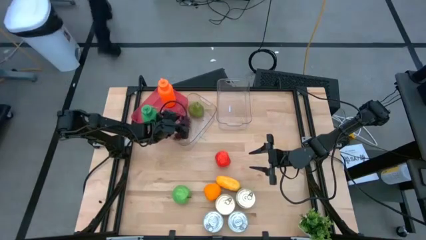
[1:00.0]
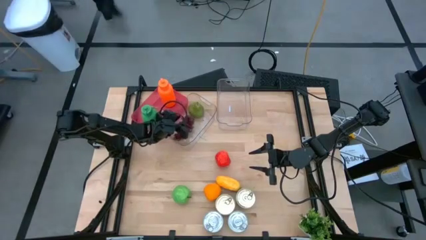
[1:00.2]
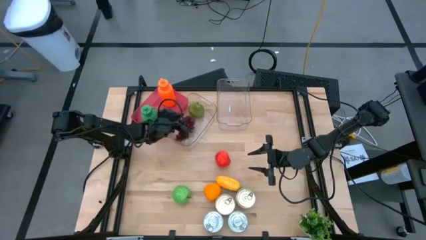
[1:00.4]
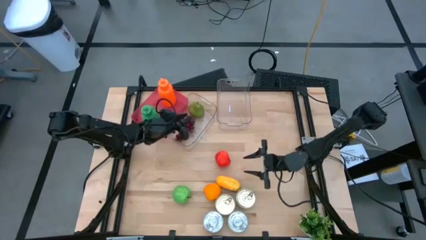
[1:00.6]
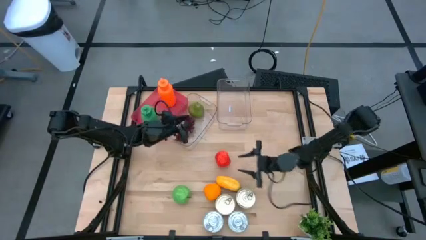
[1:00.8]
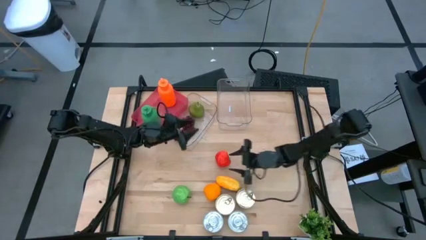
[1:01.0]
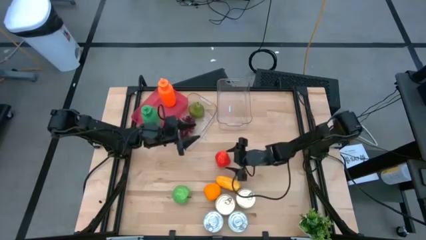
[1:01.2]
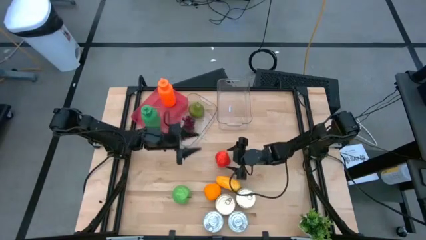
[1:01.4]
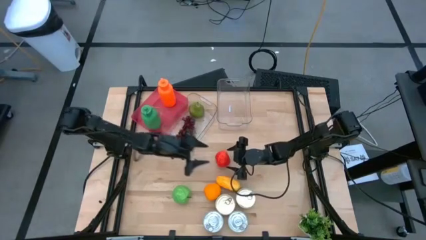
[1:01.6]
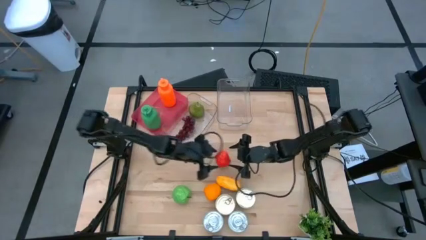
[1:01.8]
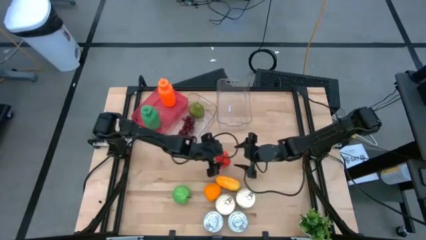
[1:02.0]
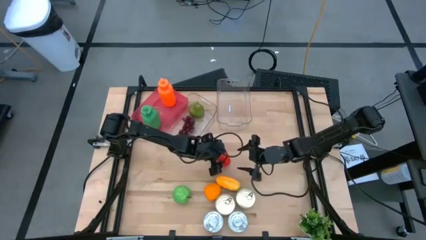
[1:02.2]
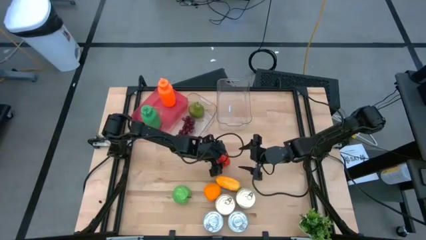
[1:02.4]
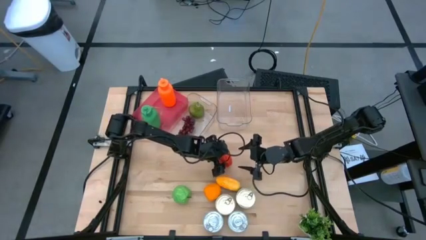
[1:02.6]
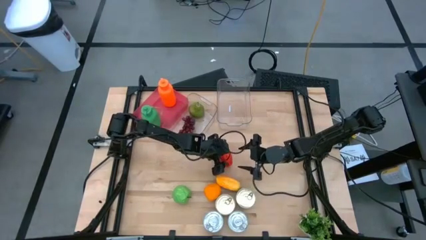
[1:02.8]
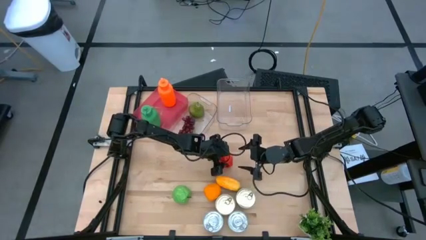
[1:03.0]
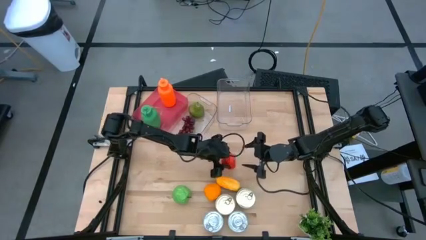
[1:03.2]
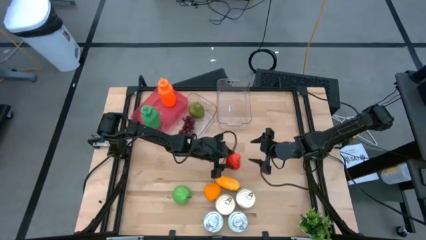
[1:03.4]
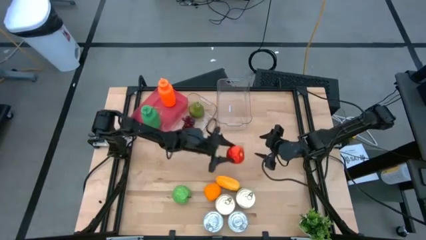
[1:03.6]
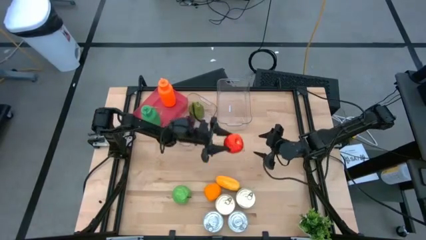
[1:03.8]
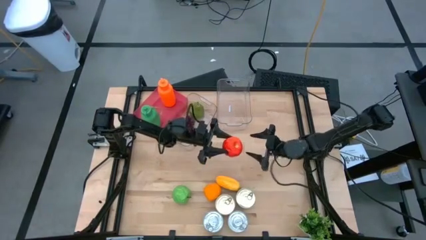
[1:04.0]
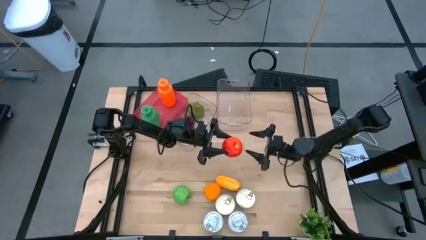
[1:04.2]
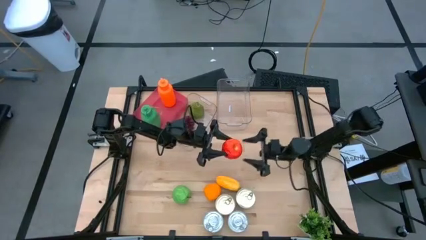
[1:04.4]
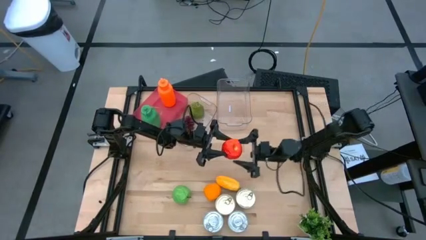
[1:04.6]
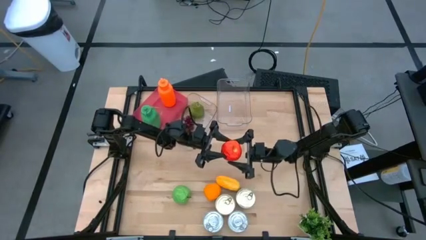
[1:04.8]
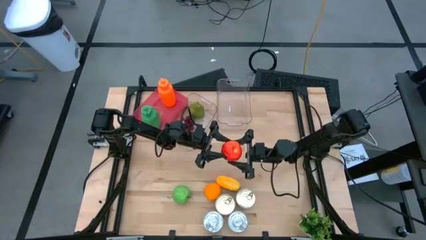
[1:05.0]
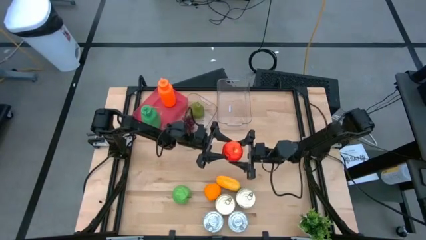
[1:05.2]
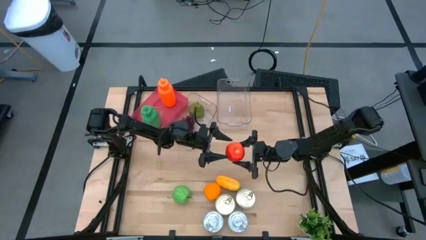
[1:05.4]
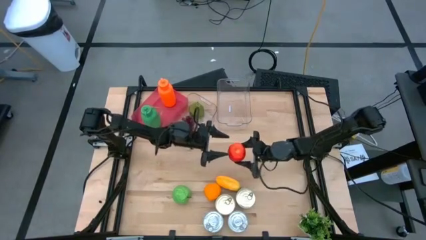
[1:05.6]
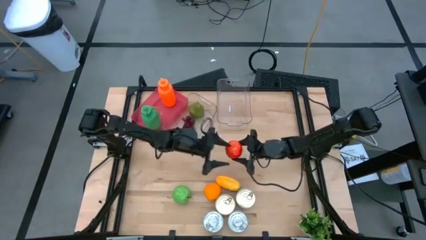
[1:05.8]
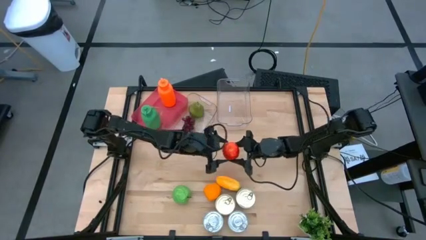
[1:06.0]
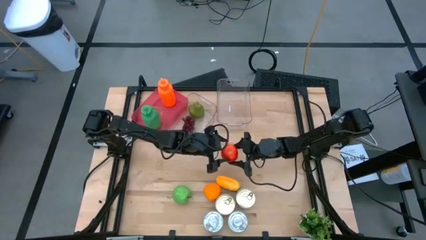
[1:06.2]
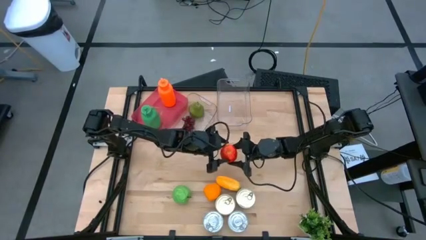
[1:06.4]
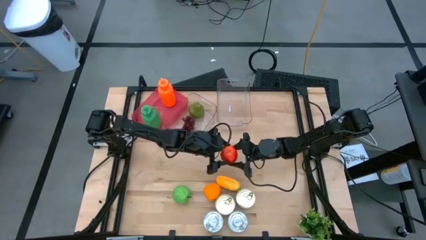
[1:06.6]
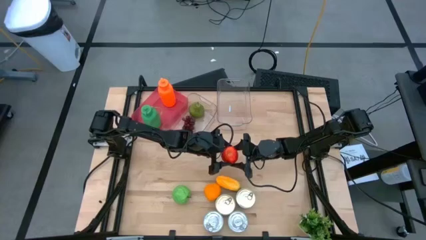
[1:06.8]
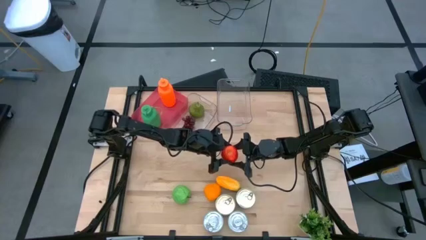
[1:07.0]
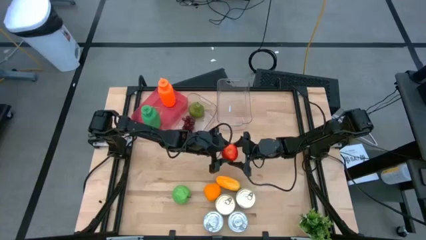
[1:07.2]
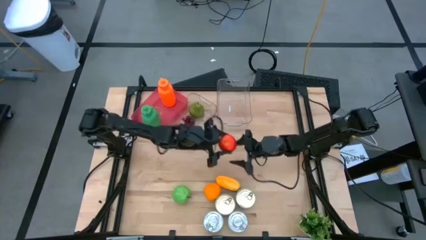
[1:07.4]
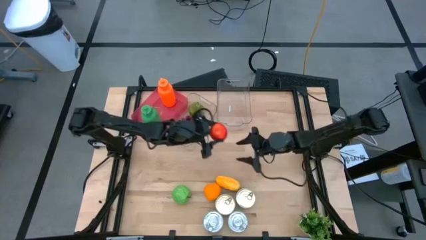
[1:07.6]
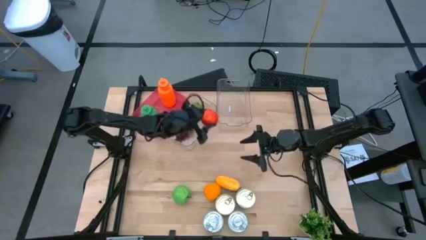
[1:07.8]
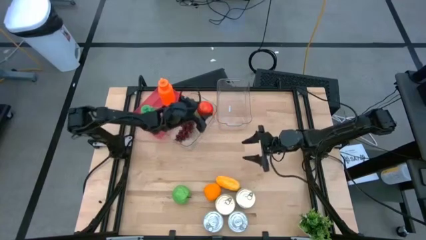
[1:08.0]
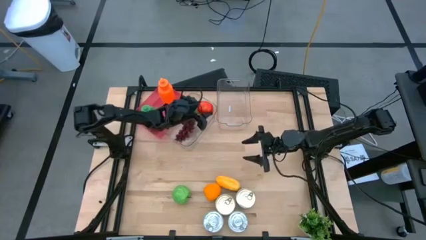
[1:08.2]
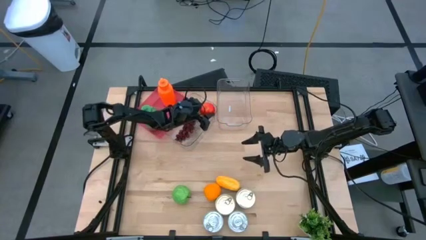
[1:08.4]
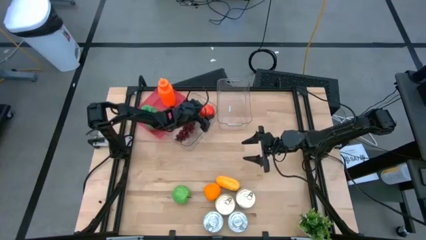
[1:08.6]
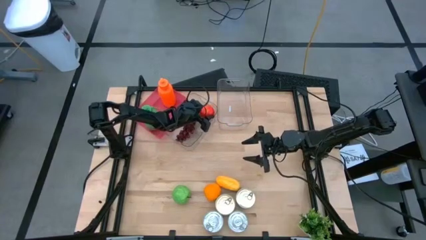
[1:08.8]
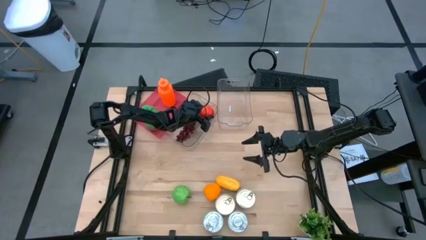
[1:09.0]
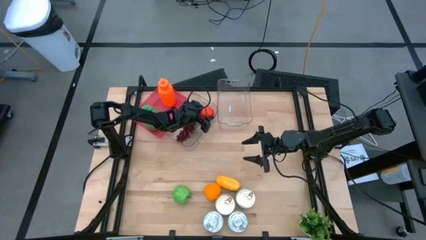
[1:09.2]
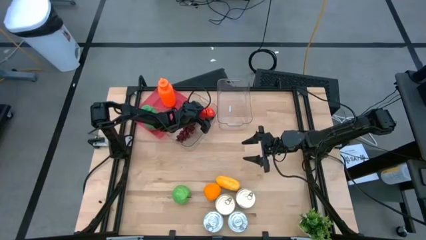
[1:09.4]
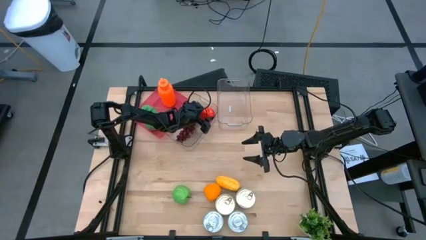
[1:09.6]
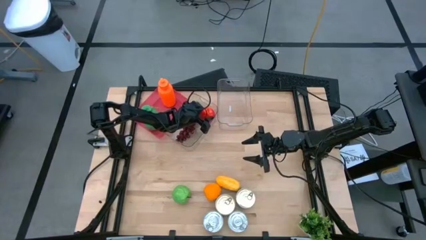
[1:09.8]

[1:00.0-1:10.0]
Task: Pick & Place Food Item
Put the red apple into the left transparent bin

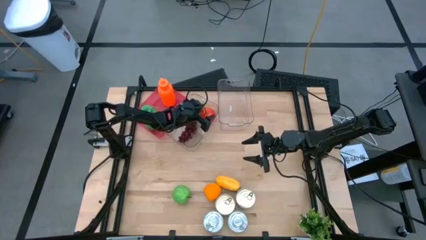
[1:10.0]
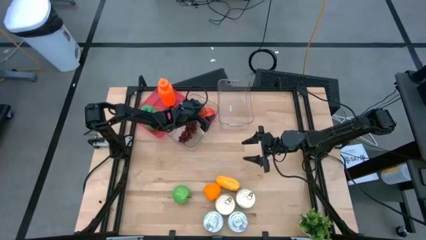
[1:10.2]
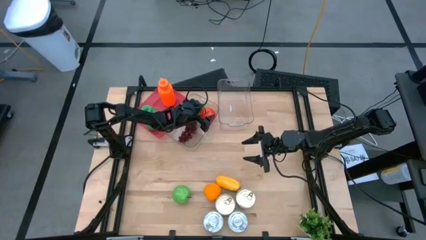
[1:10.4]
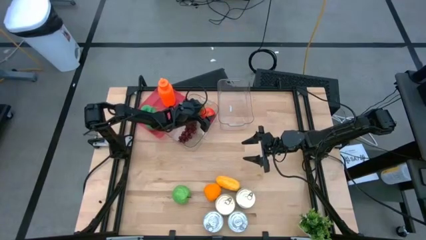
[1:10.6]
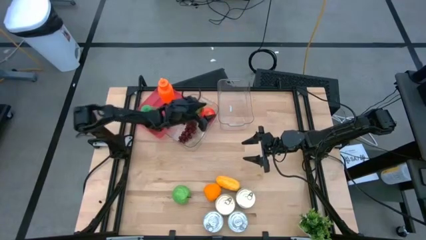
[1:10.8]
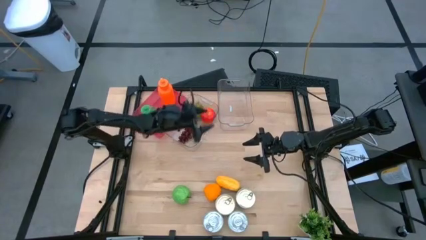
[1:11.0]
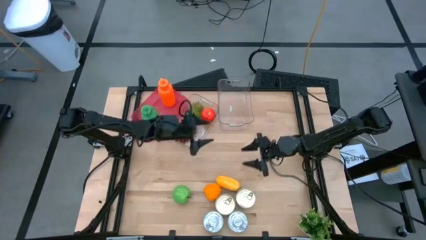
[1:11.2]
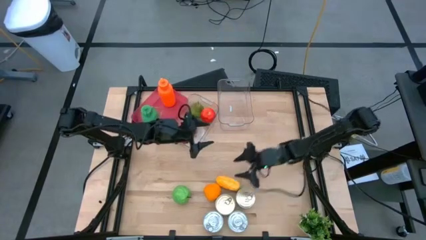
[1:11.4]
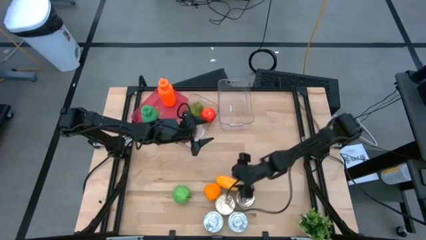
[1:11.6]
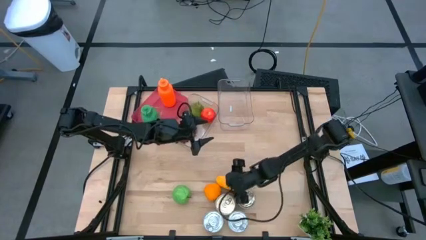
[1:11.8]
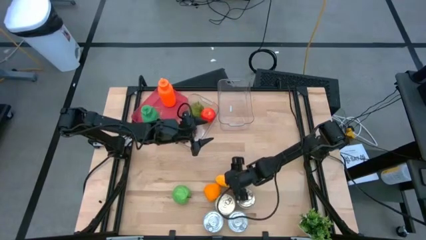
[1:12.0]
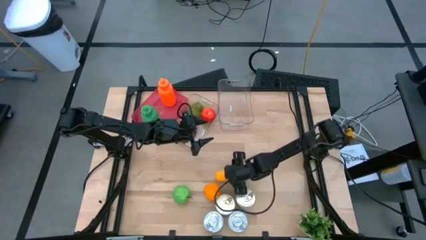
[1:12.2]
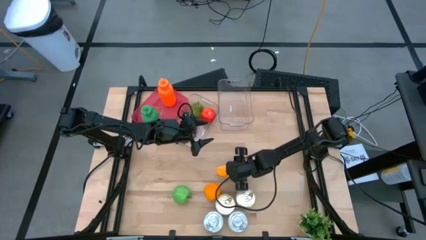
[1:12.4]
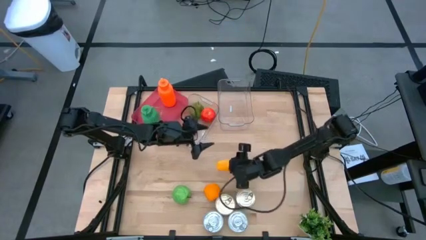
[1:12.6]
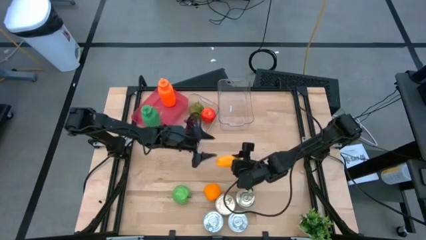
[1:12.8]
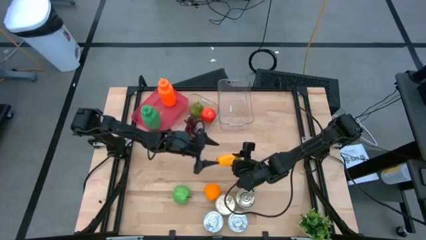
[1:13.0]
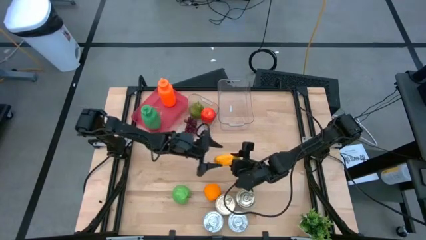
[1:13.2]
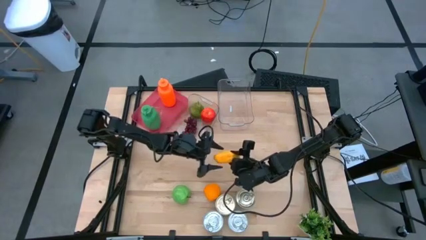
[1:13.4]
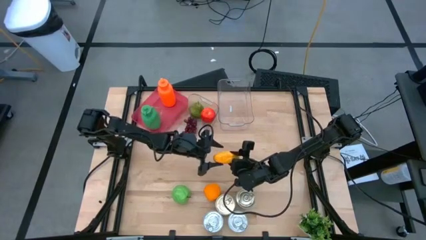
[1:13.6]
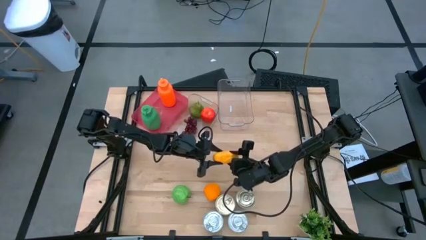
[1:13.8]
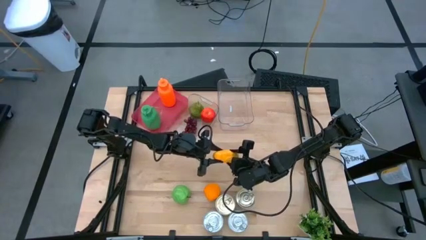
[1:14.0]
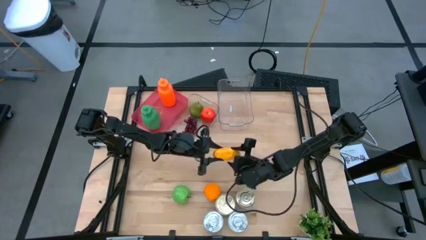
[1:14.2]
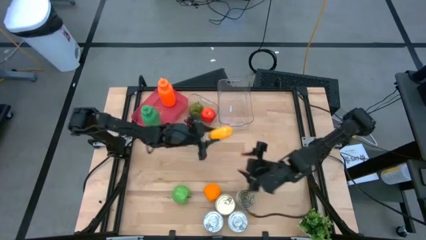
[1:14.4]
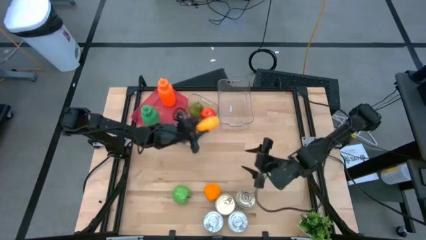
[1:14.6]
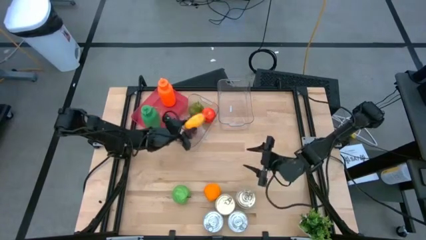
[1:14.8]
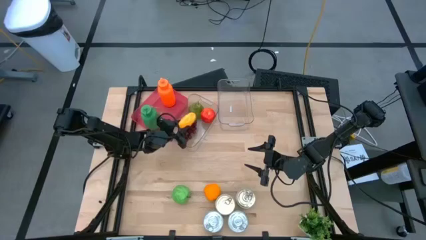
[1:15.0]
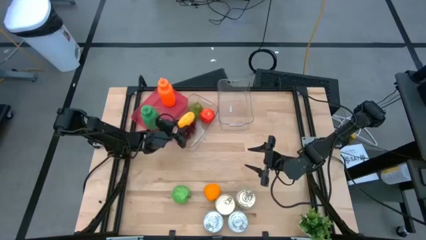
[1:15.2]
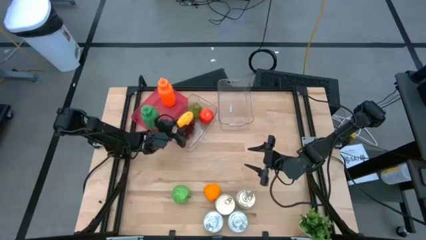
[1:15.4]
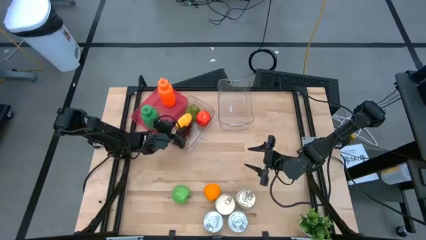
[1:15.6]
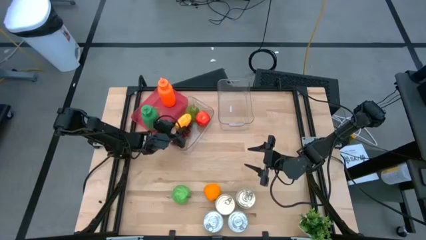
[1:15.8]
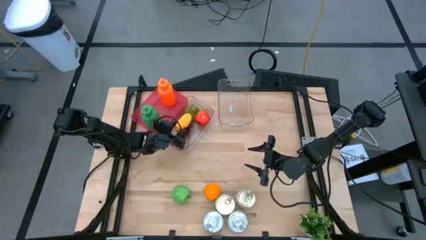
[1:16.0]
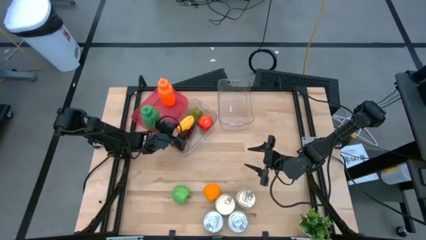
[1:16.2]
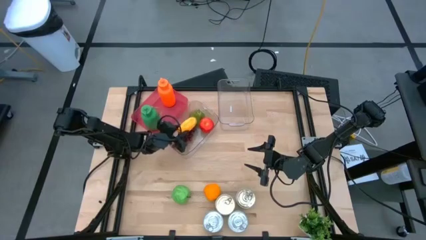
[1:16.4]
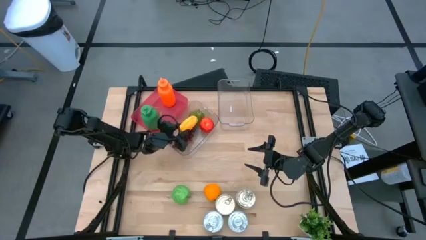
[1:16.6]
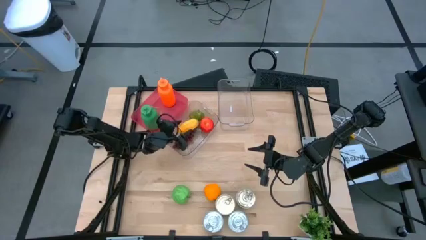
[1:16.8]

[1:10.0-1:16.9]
Put the yellow mango into the left transparent bin
